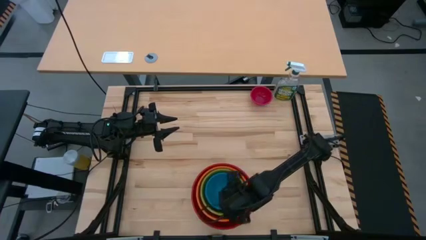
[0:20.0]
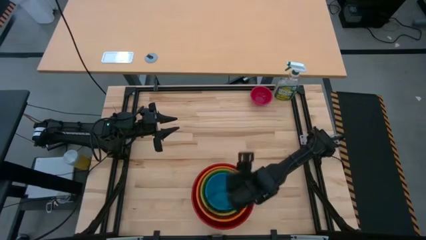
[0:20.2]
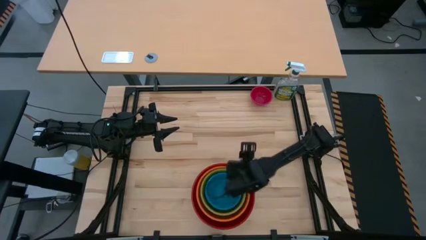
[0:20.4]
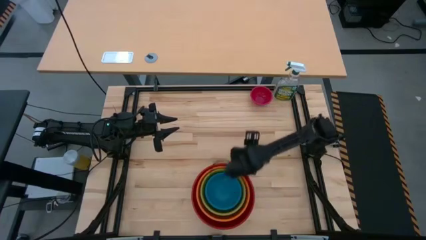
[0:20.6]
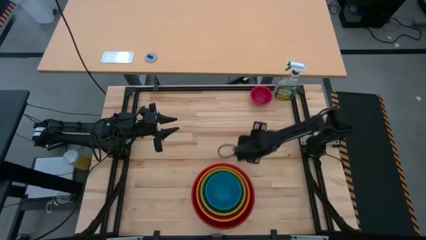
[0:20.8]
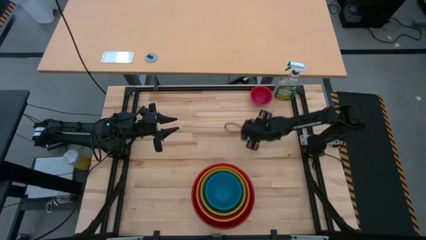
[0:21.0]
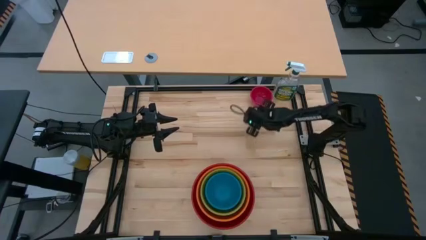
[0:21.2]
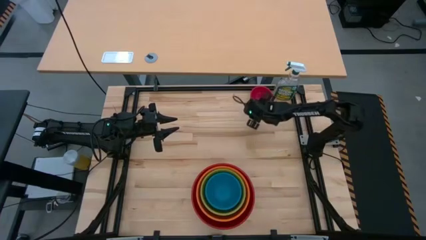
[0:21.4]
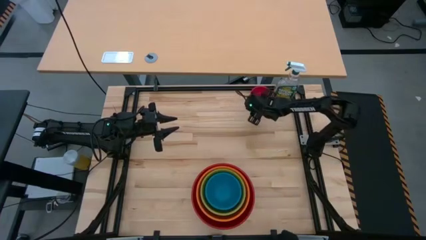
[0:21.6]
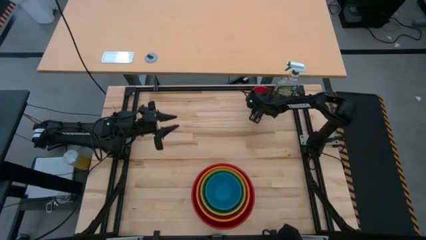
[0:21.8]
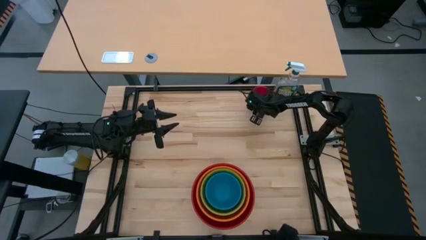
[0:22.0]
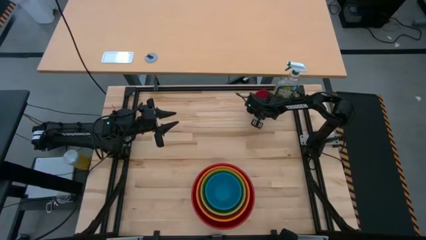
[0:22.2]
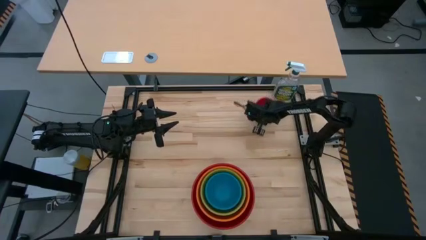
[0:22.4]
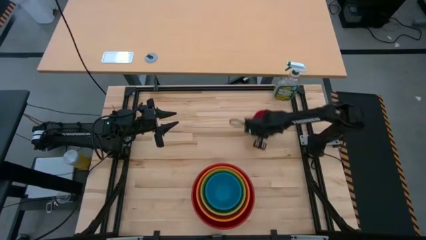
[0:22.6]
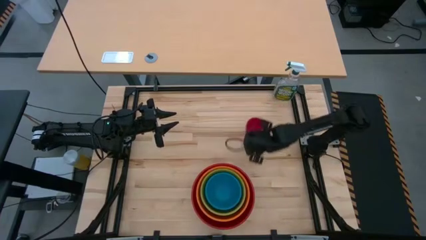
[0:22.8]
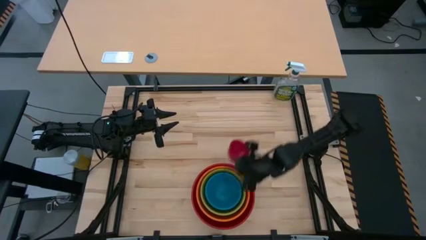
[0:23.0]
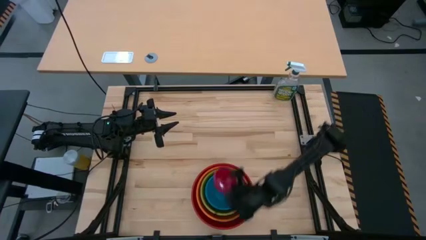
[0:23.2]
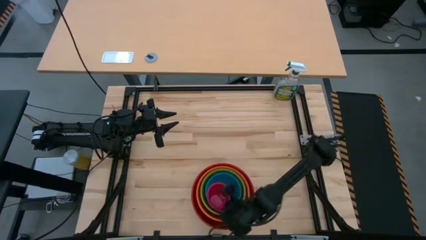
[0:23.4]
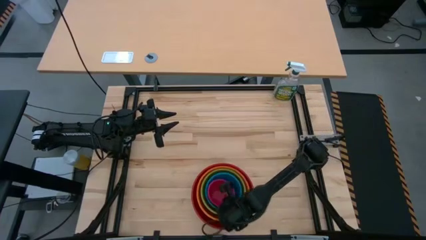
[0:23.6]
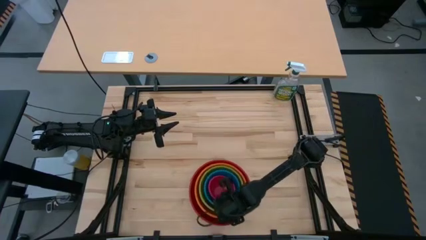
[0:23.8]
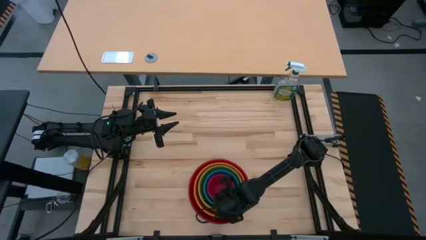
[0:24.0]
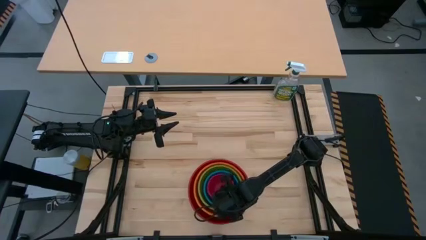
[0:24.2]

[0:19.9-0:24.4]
Stack the pink bowl on top of the blue bowl

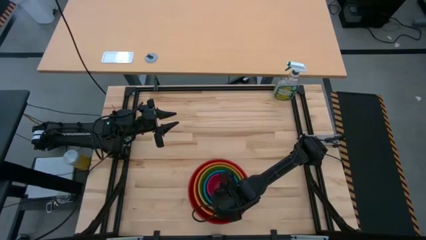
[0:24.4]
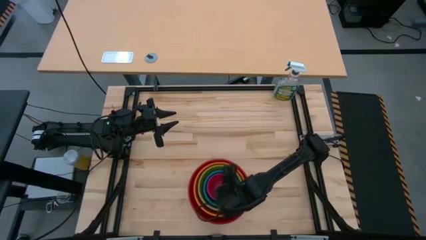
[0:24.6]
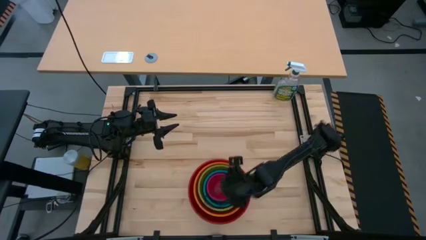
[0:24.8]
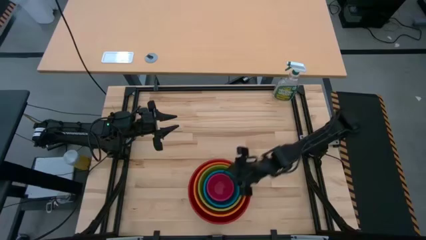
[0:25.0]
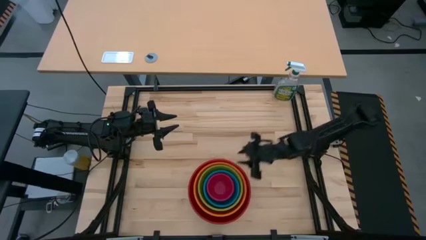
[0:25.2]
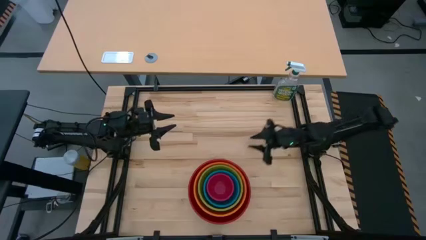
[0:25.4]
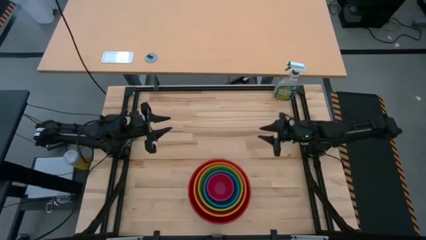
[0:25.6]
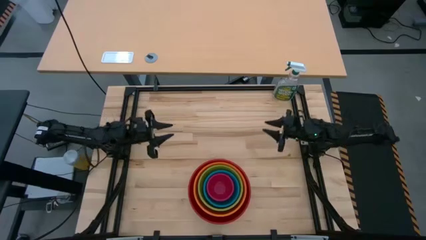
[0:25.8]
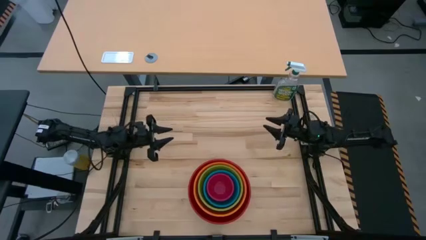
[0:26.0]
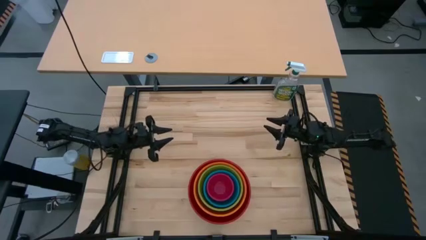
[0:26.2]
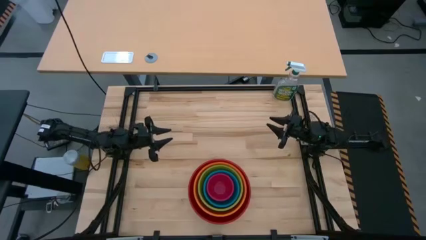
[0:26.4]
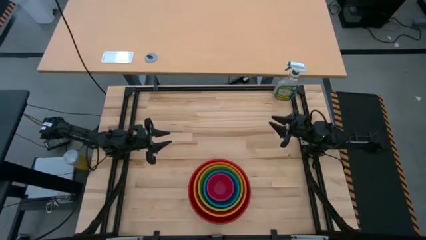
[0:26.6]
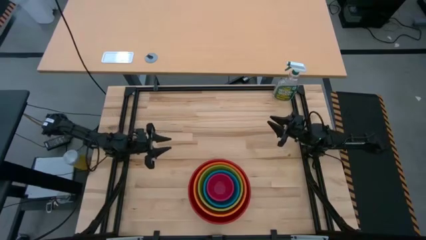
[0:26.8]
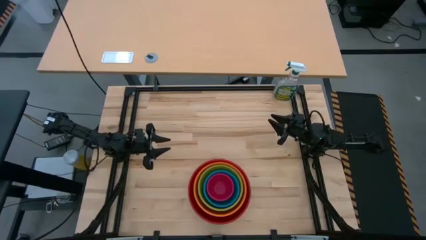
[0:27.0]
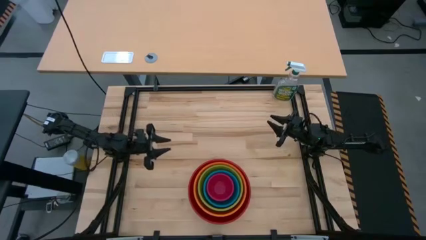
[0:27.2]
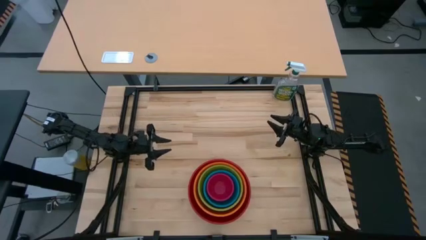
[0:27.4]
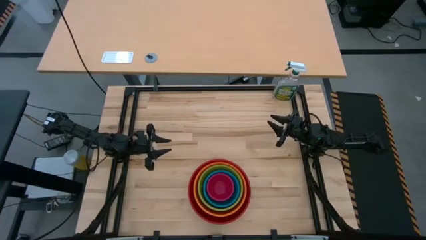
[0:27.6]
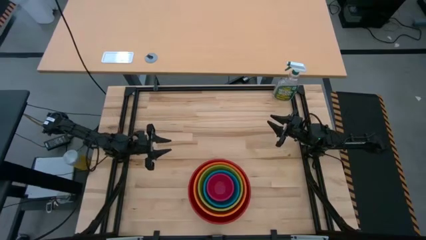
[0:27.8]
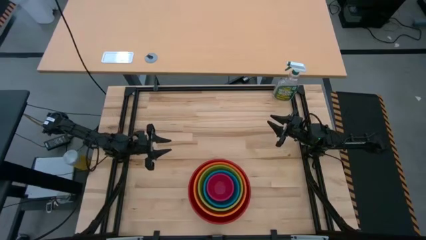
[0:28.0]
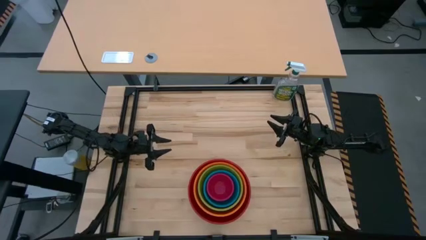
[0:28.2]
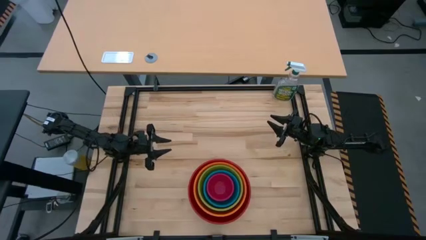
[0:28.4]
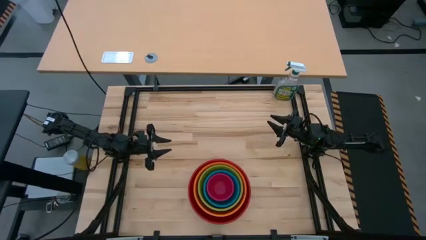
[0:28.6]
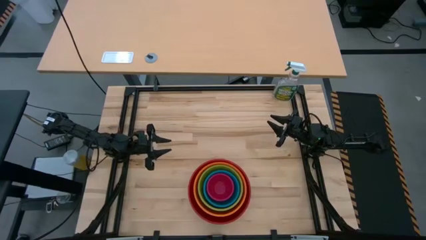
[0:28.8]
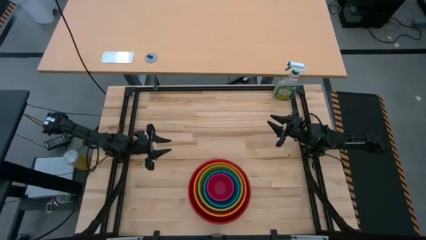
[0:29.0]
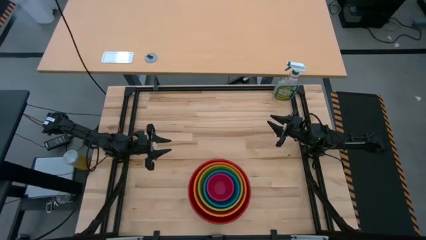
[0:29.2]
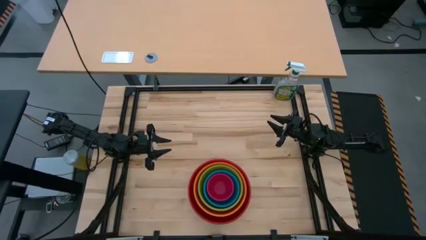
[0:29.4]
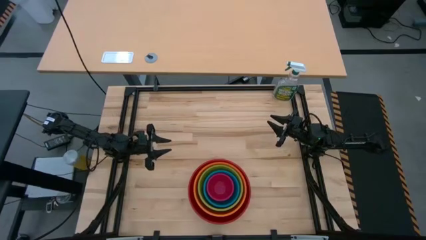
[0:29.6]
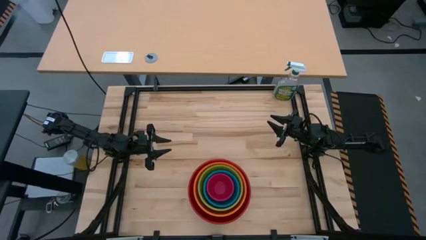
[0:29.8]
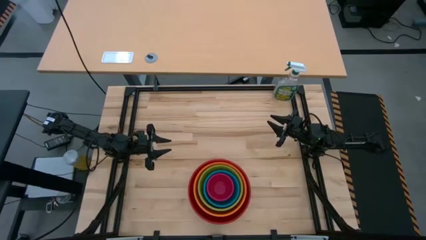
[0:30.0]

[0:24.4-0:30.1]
Return to Home Position
